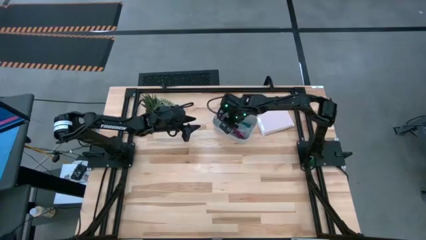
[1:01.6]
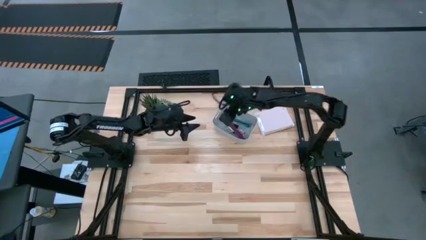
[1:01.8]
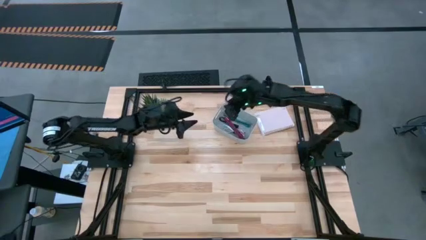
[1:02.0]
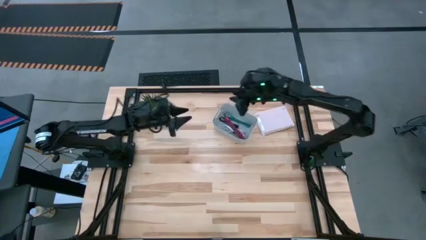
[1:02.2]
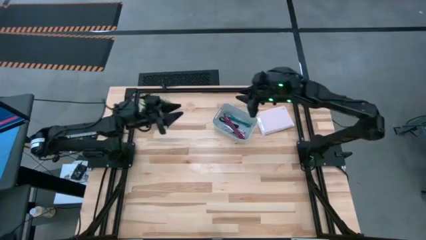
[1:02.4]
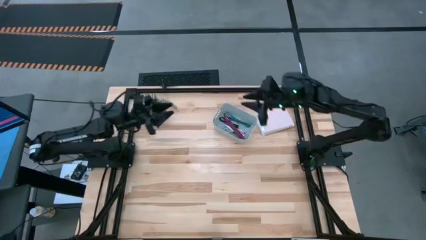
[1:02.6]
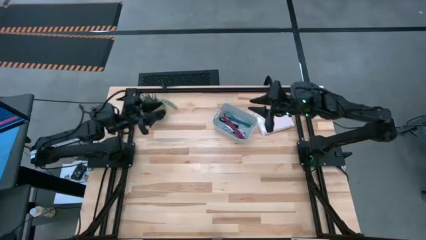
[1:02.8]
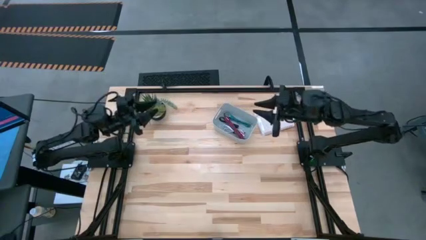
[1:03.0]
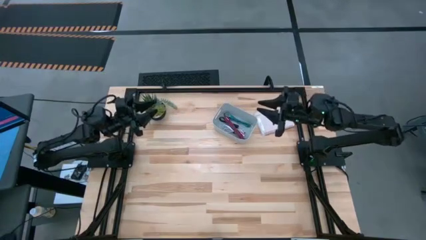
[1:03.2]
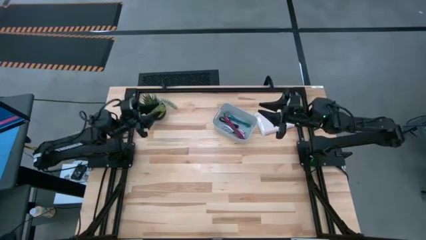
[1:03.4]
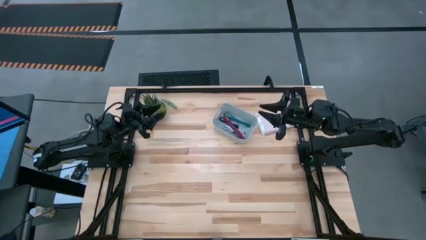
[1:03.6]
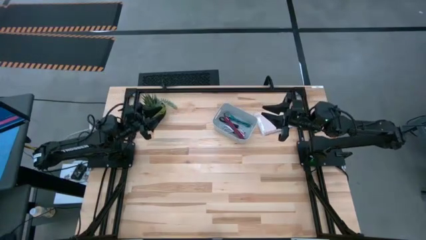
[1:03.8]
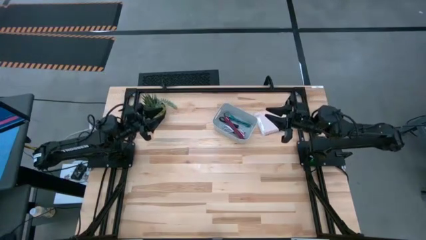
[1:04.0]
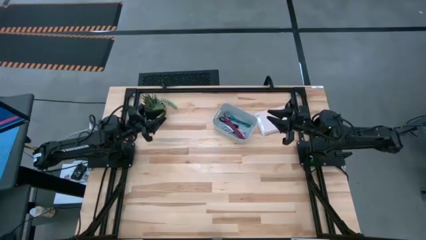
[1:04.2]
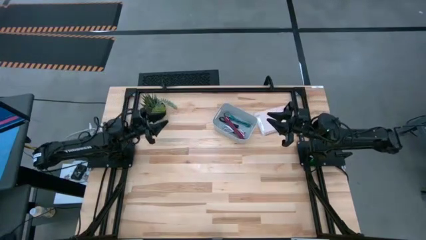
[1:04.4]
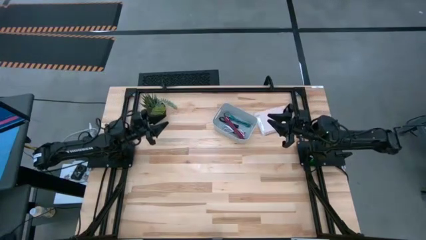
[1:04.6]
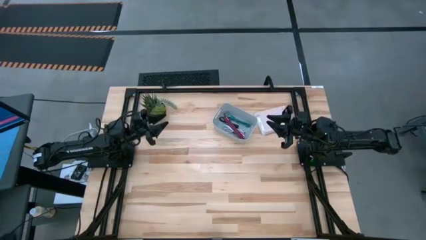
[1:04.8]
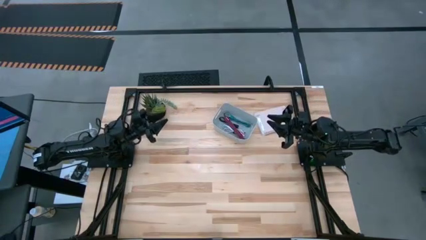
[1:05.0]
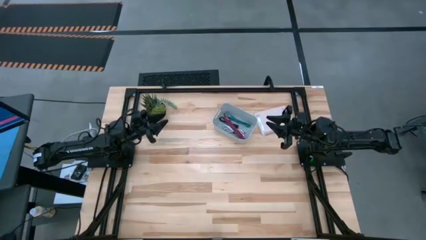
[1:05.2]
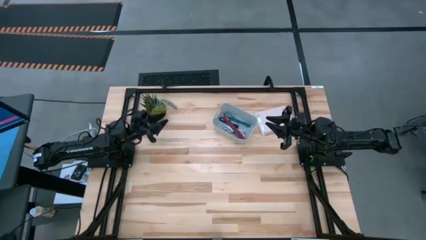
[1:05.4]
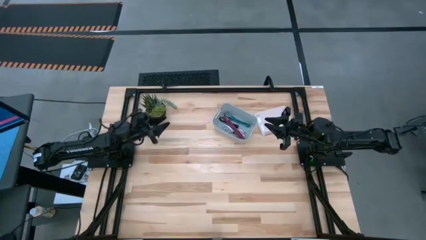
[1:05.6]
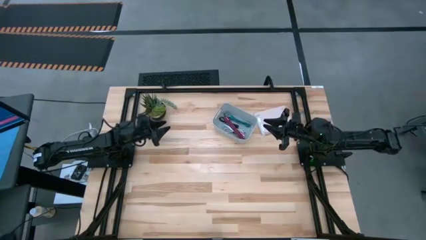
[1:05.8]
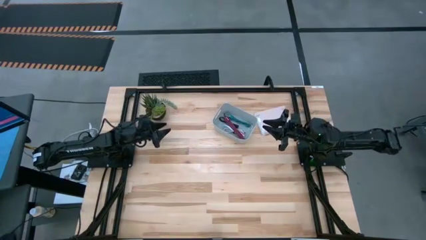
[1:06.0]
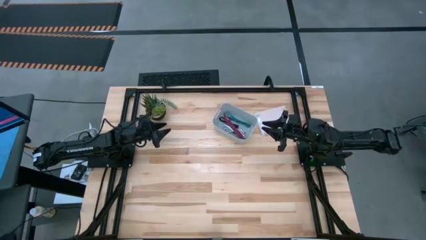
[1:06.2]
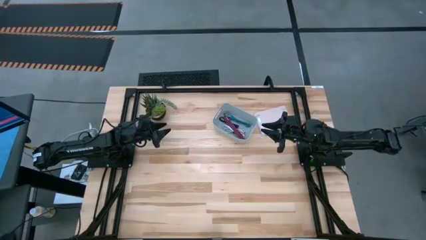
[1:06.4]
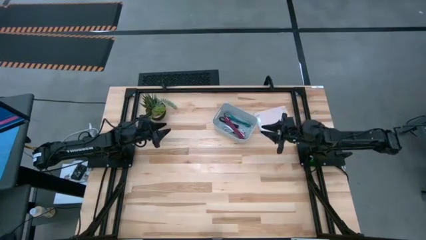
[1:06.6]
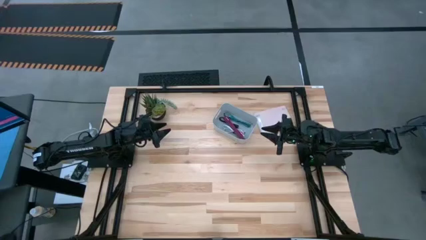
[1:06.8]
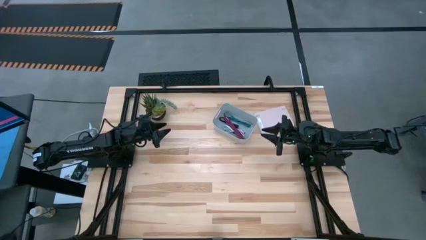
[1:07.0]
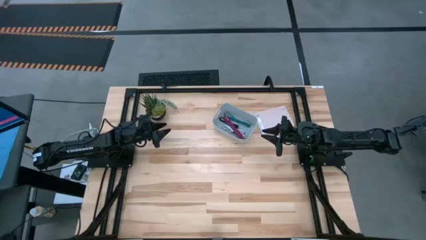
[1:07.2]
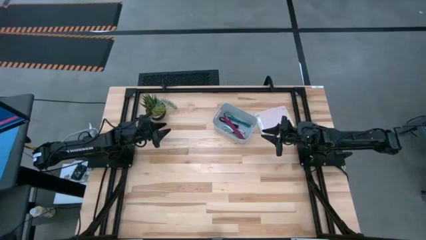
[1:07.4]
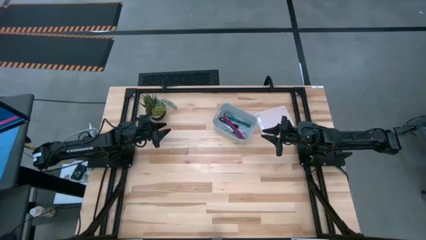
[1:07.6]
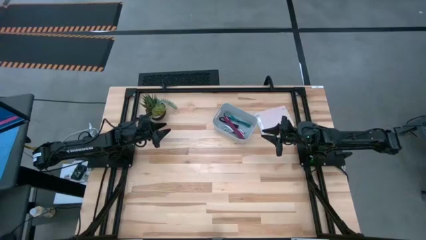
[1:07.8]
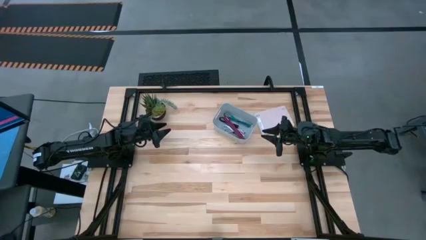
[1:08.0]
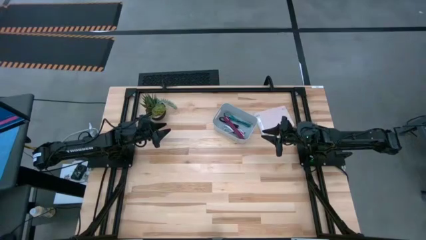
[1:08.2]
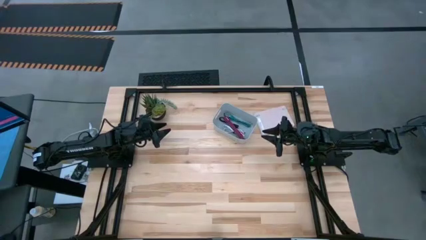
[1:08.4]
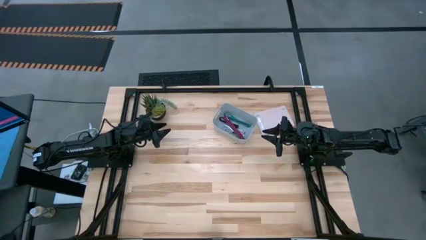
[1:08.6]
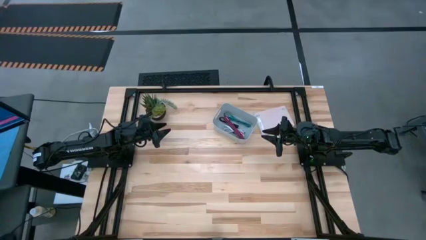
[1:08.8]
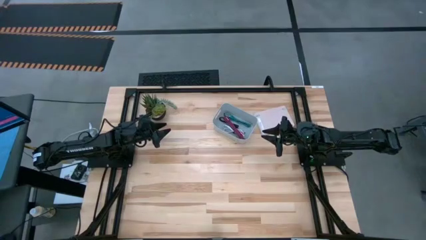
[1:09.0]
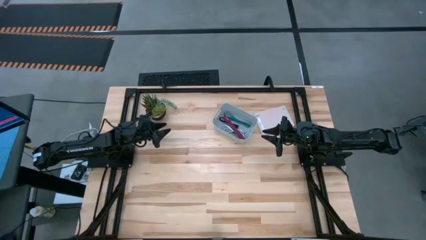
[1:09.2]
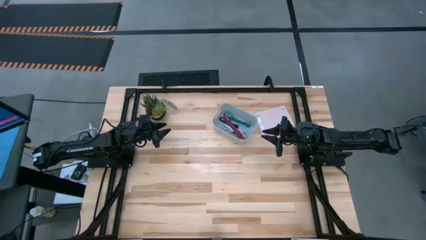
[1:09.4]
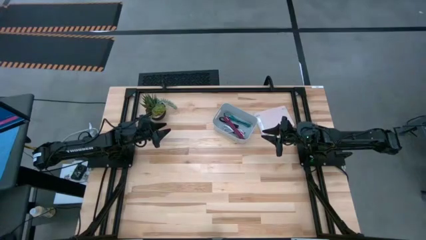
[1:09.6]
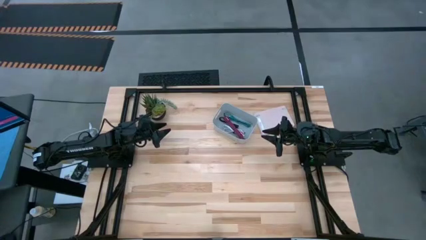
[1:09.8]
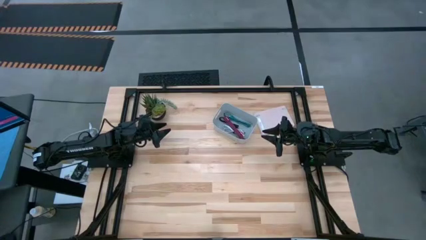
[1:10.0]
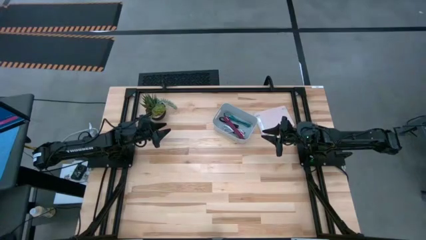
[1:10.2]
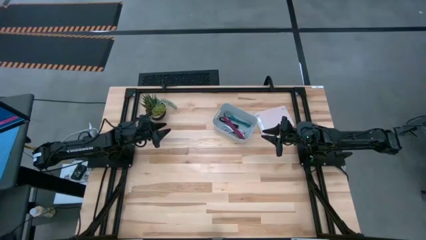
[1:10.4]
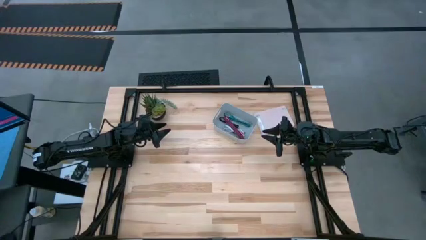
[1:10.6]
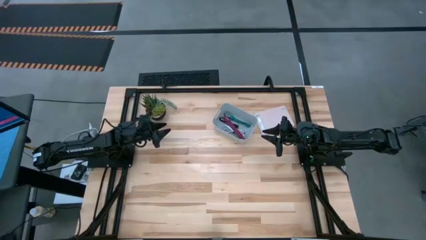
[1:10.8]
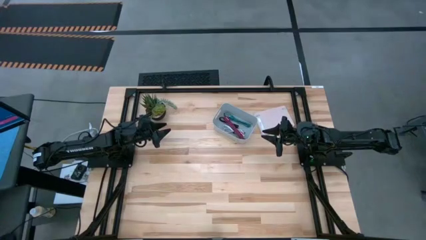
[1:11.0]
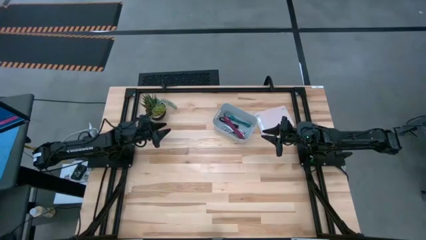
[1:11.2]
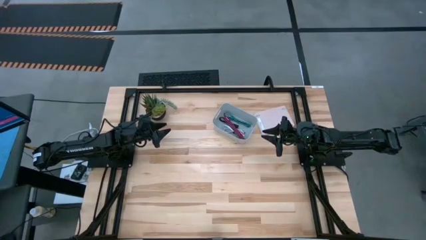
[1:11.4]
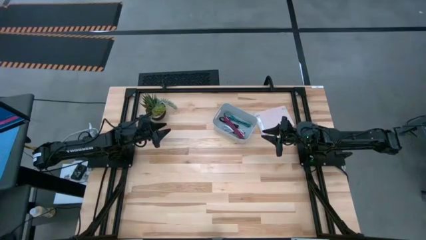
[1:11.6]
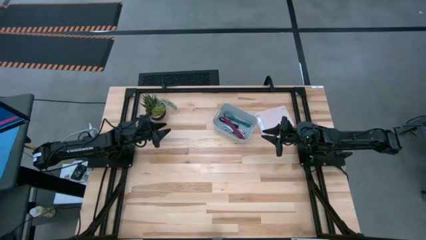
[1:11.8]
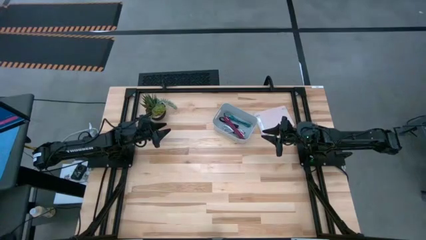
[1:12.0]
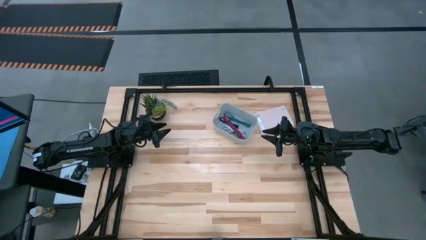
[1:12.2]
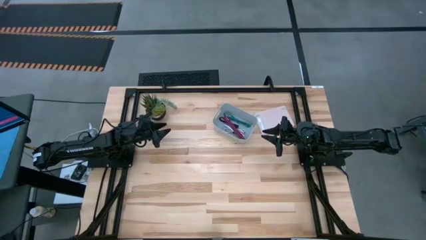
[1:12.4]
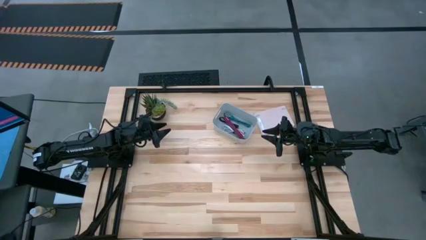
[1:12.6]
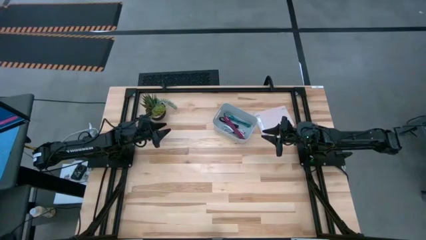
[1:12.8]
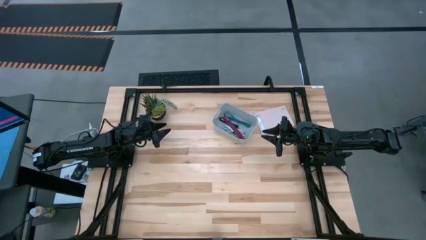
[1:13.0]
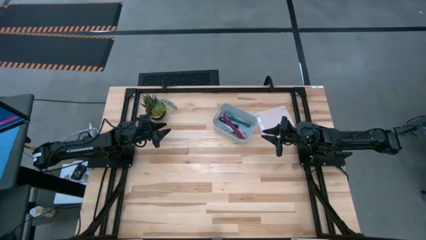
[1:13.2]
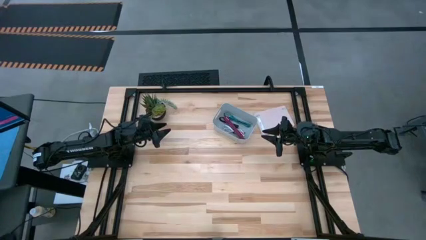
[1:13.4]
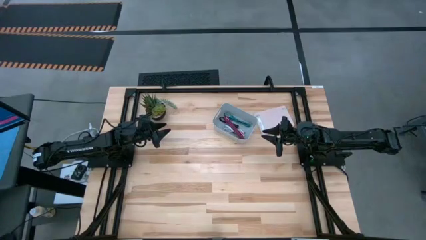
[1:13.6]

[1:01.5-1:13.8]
Task: Pick and place USB-C Cables
Return to Home Position
